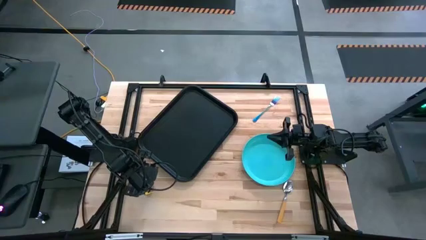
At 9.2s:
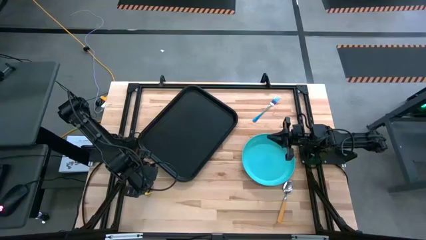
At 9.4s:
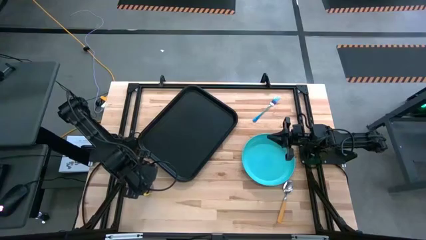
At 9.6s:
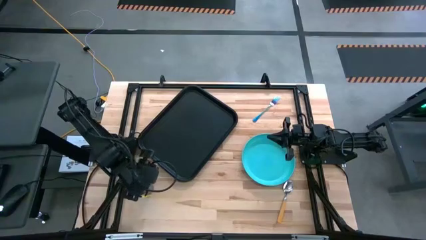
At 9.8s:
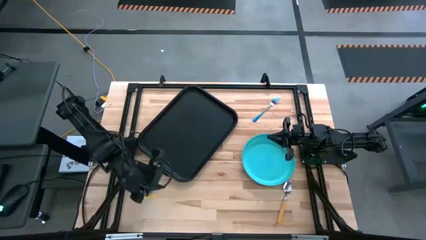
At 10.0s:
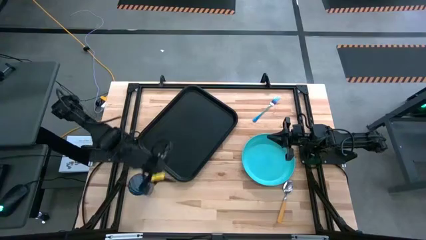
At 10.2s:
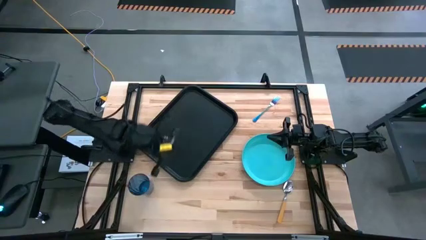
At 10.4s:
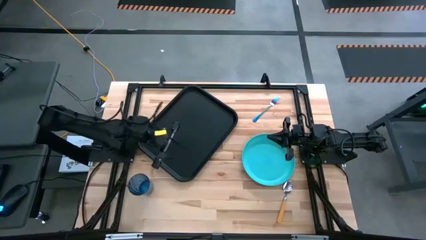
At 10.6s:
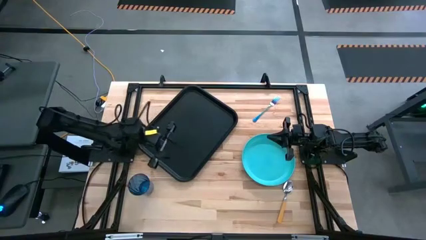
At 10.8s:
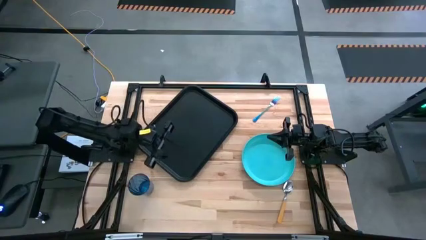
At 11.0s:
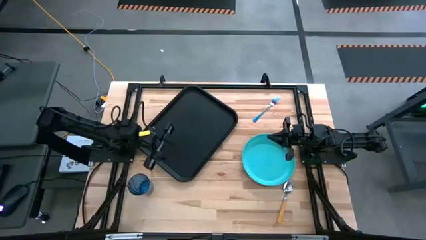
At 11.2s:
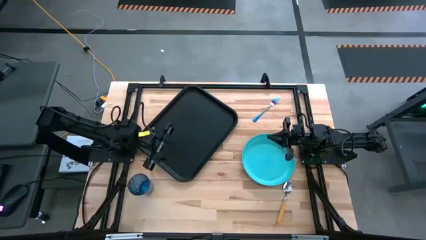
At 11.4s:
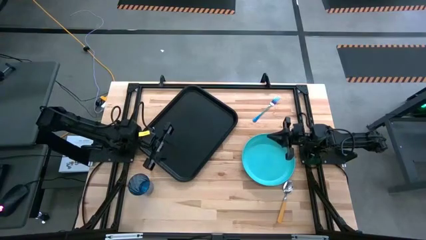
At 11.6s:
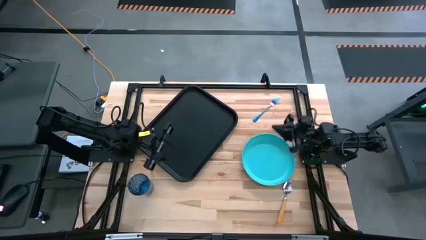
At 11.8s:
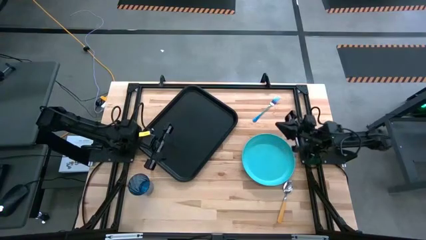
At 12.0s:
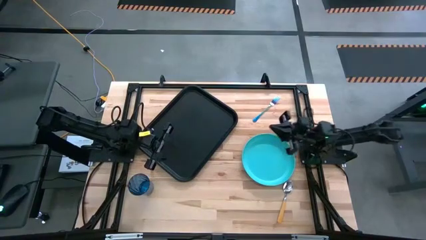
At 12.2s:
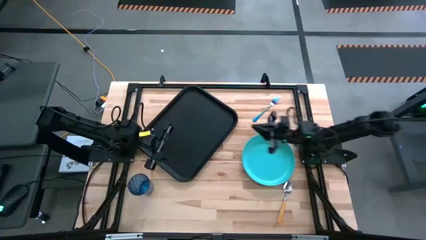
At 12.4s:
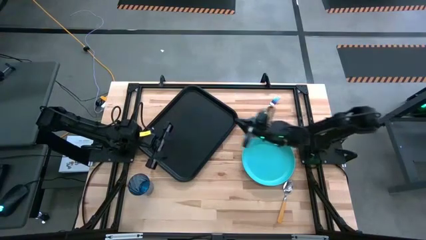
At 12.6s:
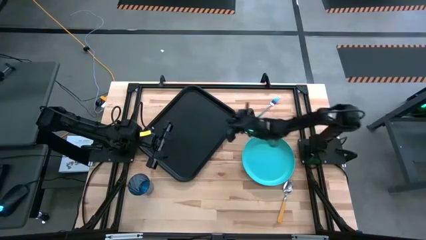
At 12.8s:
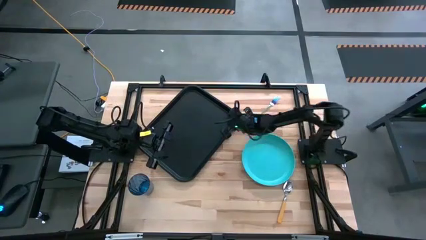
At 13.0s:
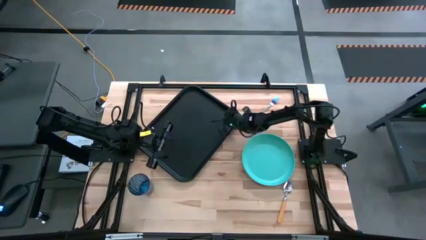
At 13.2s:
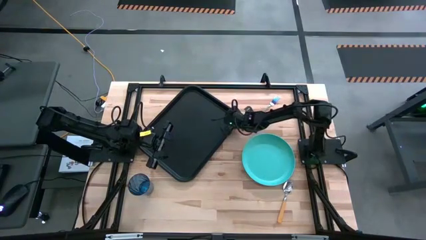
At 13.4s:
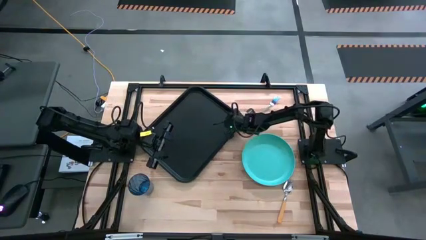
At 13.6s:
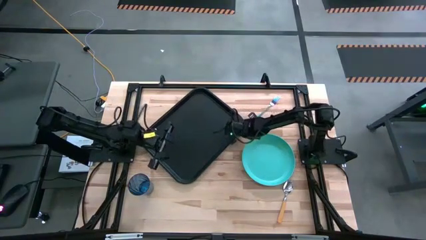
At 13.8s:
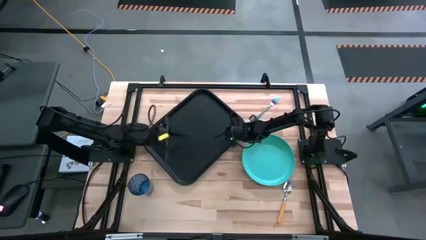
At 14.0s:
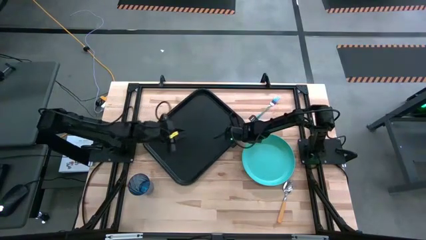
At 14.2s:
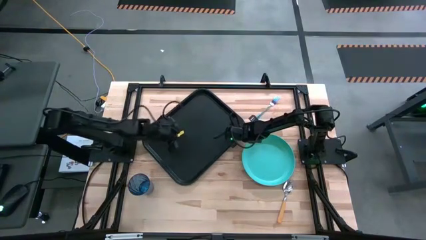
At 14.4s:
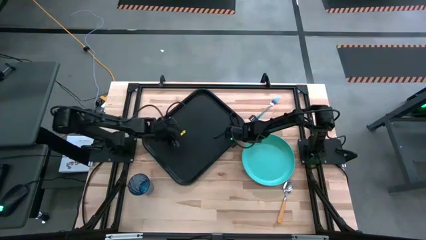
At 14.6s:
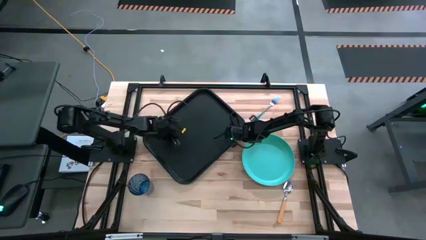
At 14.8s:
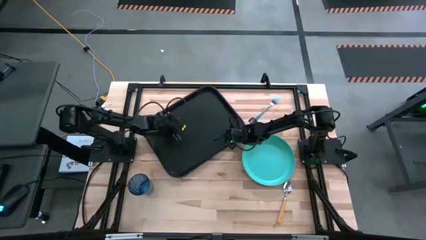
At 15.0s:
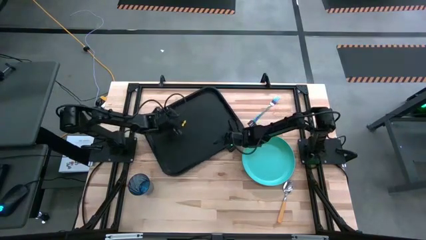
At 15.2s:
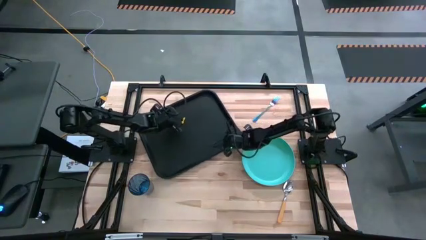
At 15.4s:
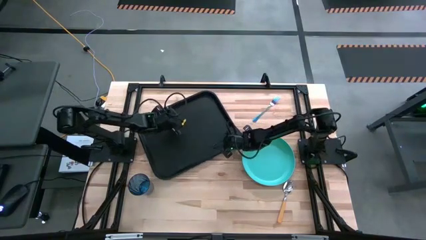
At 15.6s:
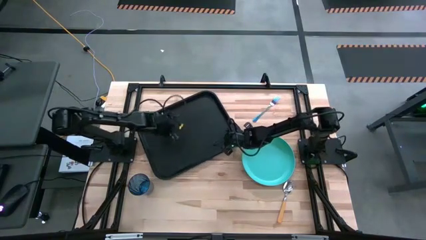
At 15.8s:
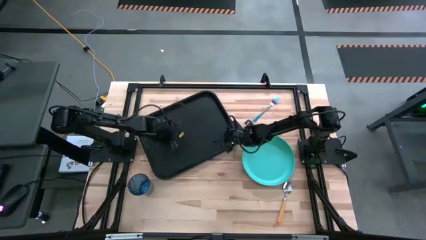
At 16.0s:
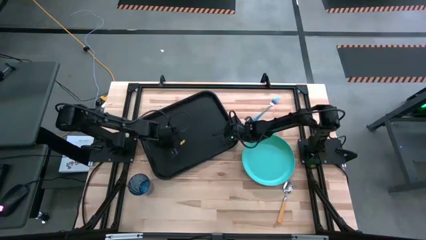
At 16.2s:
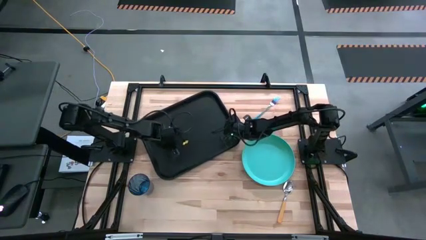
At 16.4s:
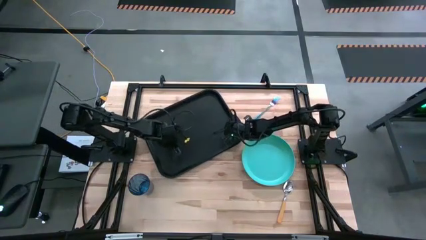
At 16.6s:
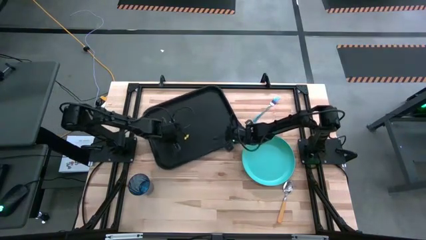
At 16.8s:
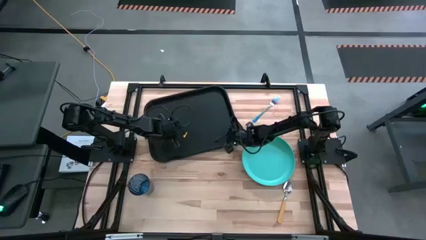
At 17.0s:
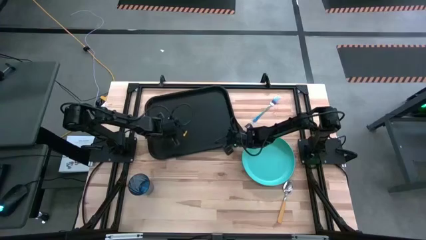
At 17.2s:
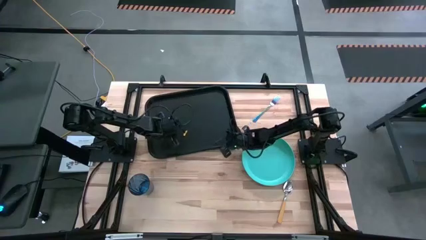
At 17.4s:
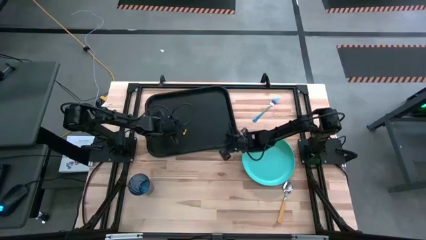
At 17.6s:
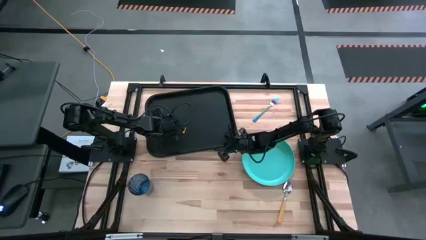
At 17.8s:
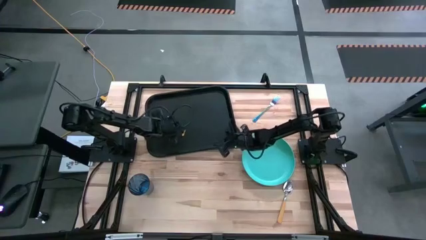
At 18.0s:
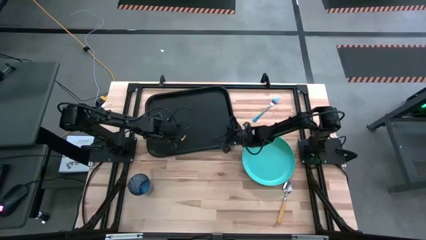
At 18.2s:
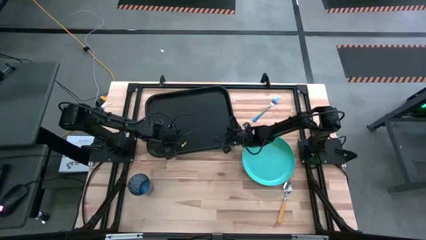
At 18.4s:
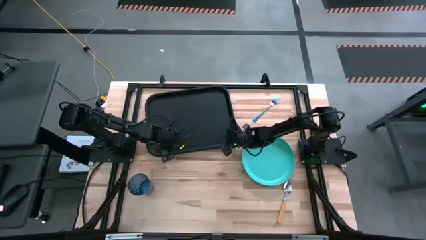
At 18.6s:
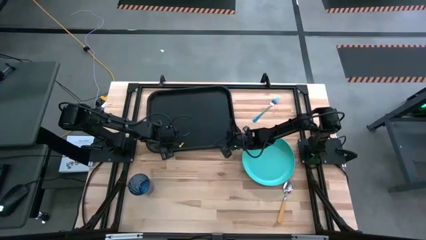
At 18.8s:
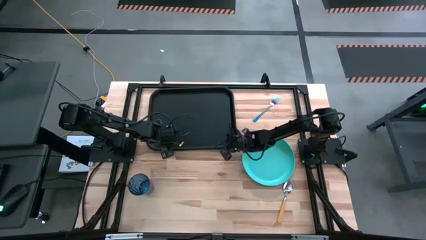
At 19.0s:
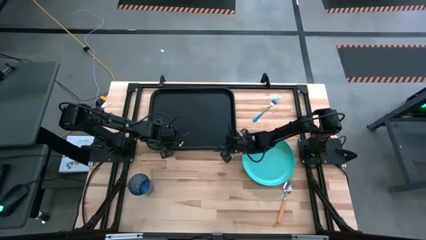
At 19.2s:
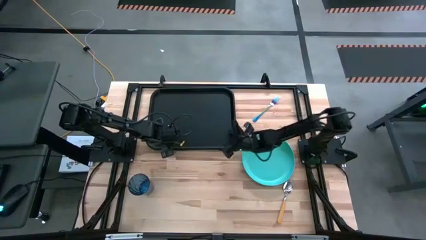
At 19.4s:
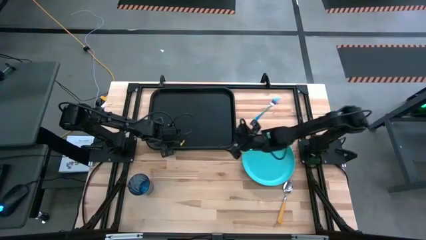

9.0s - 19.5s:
Task: Pick and place plate/cup/fork/spoon on tray
Move the black serving tray to the top left of the table

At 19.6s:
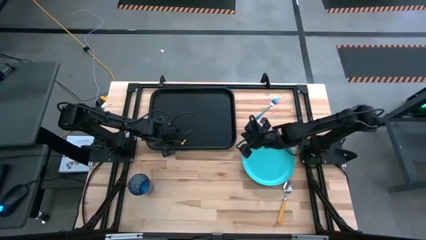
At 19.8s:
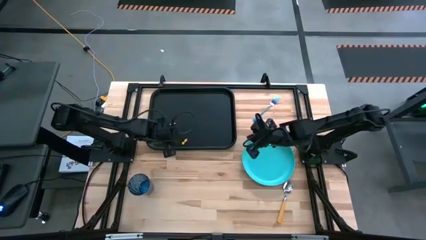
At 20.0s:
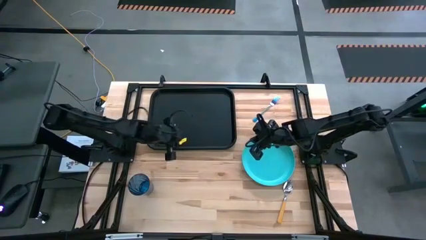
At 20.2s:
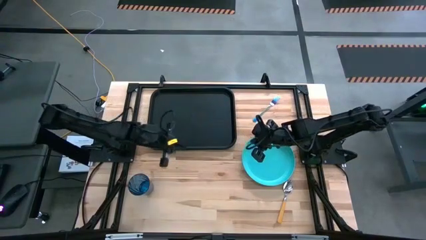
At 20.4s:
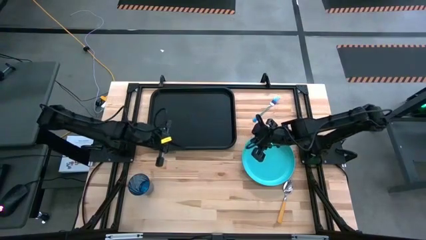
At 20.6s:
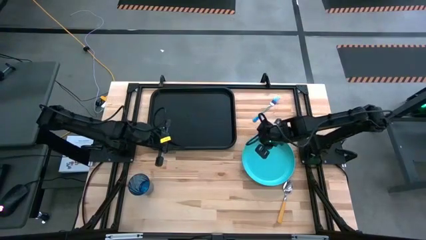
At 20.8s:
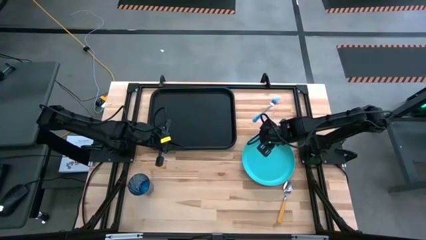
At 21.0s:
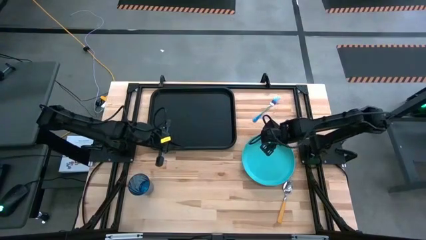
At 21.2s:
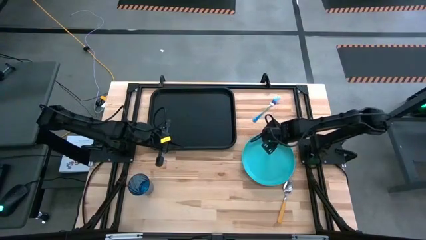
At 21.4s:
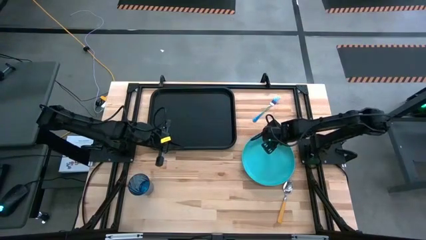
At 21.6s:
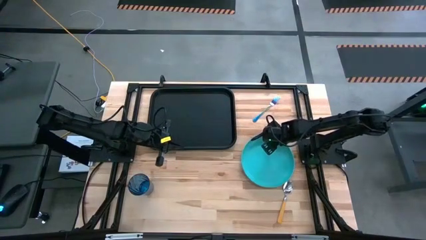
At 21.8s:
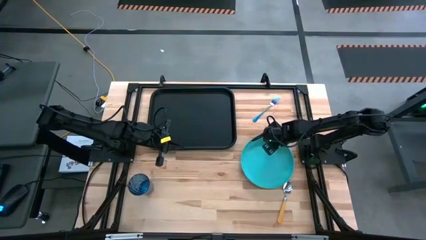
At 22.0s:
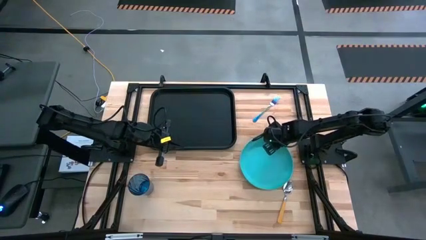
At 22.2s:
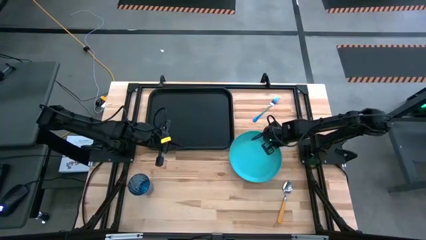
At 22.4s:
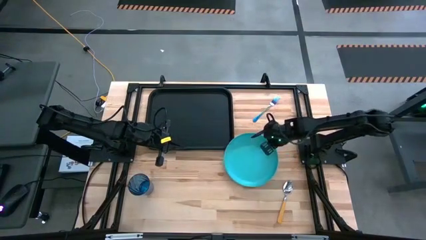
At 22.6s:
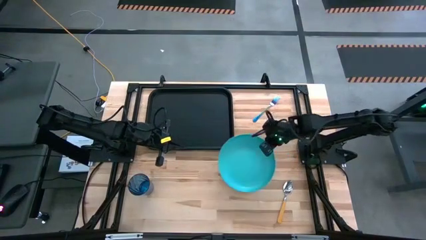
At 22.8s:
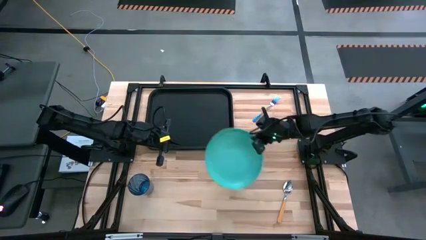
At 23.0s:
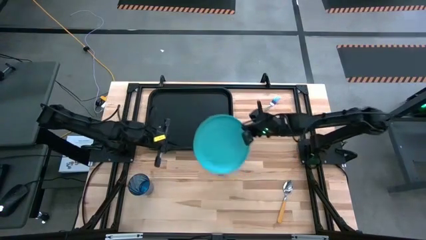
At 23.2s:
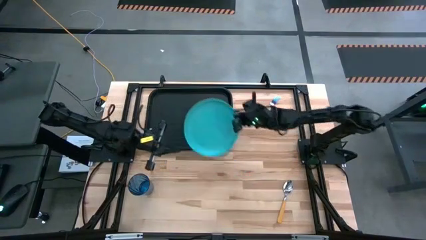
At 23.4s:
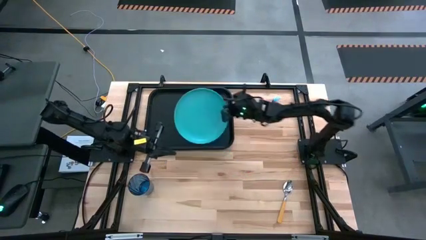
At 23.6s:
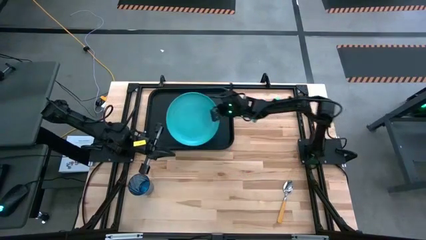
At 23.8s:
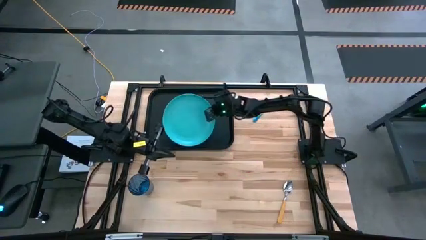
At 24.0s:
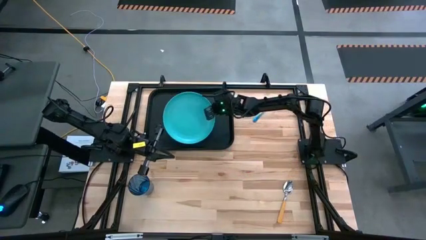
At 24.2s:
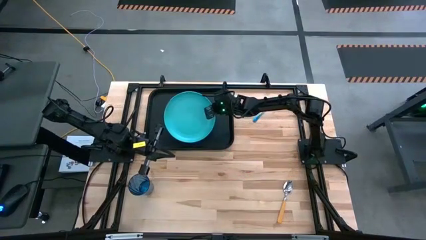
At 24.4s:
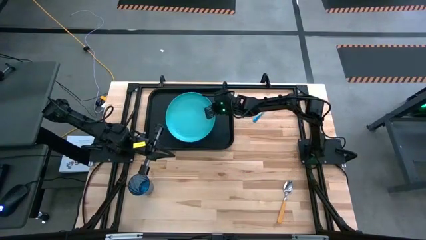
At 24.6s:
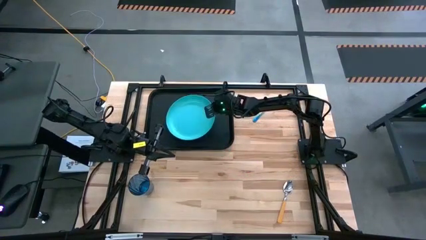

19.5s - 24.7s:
Put the blue plate on the black serving tray

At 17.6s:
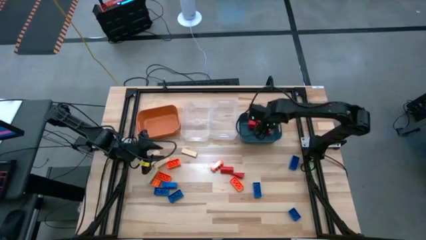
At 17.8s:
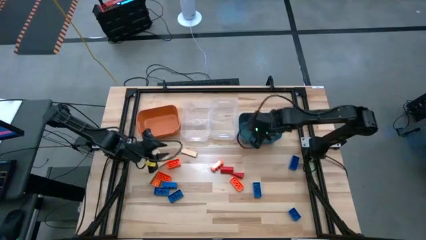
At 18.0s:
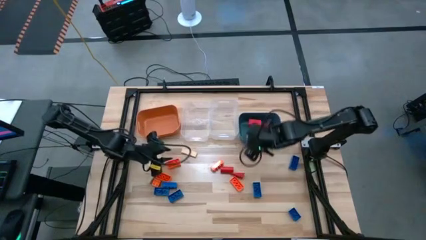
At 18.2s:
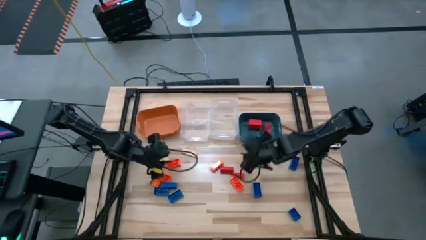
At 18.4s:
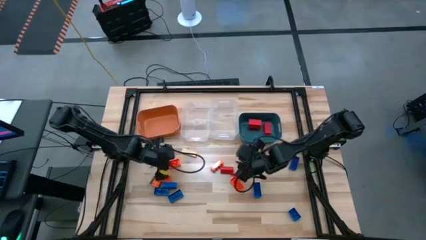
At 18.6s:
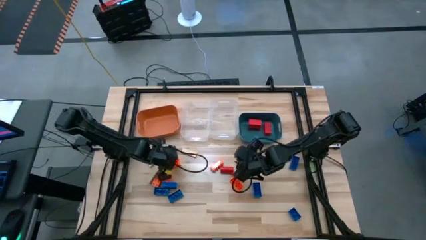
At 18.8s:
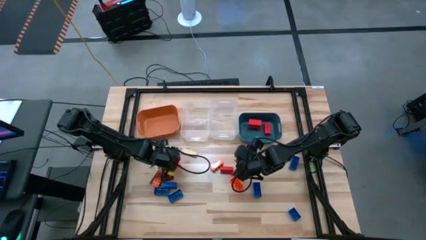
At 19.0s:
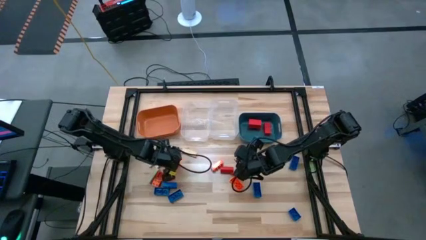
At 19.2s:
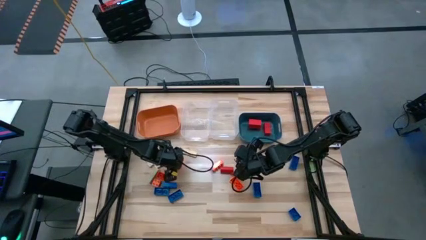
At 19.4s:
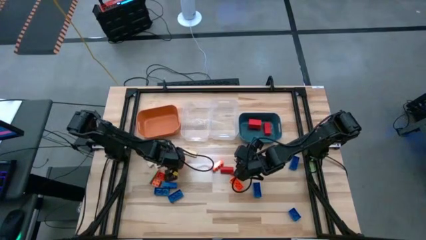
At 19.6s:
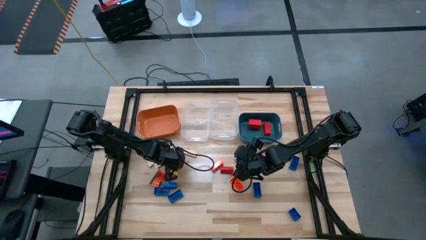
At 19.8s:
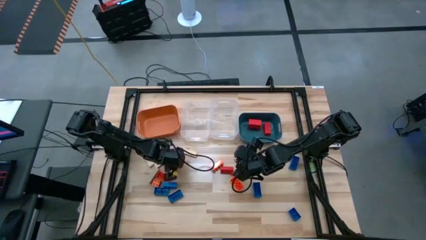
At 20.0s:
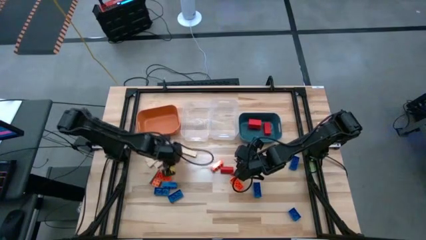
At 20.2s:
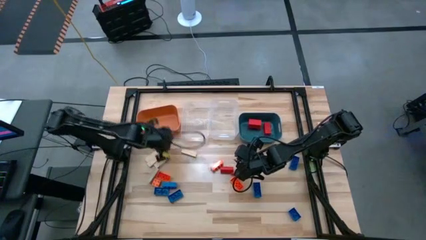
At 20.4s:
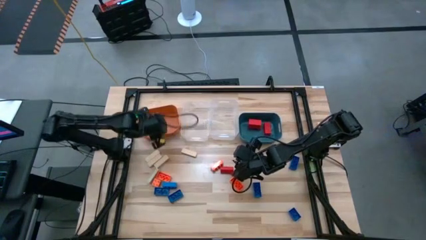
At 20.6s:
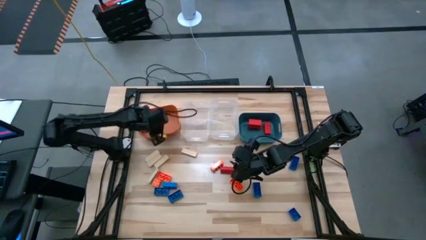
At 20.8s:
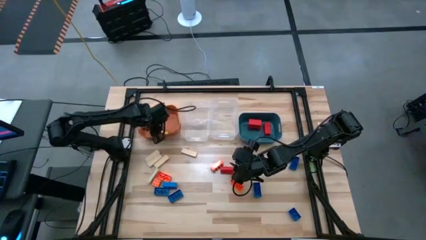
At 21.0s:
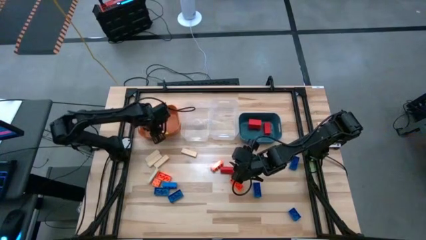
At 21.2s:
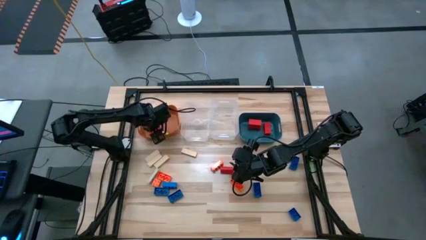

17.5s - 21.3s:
Task: Sort blocks
Put the orange game piece into the orange bin
